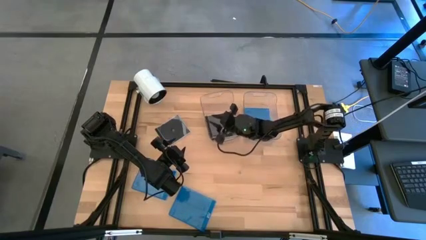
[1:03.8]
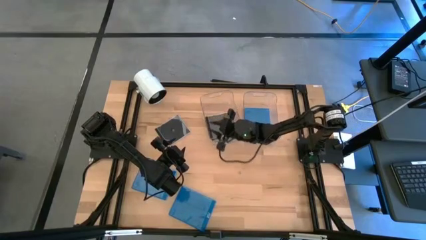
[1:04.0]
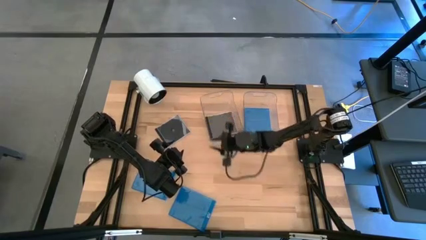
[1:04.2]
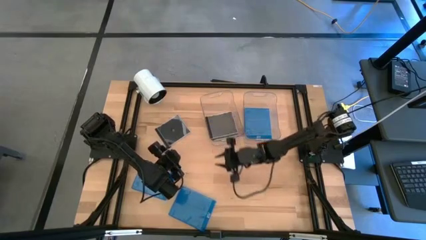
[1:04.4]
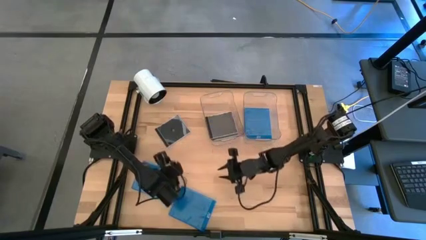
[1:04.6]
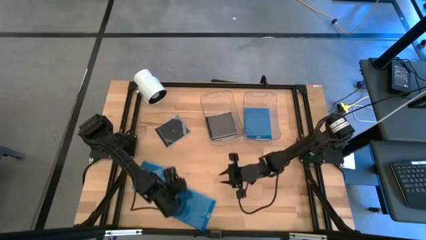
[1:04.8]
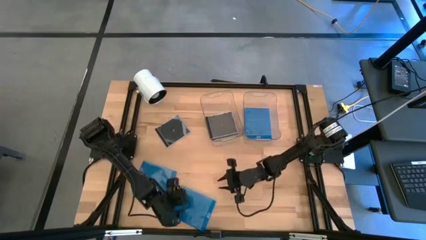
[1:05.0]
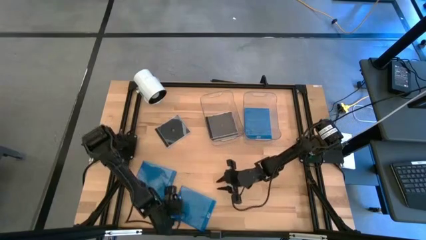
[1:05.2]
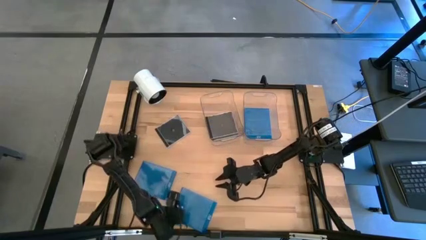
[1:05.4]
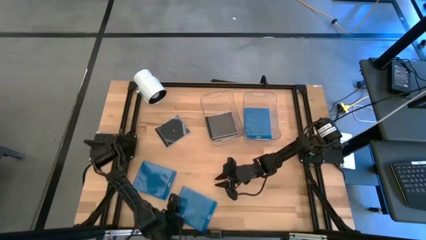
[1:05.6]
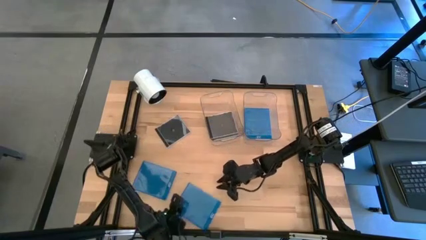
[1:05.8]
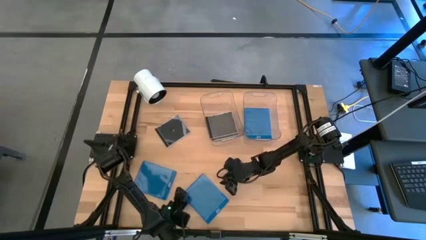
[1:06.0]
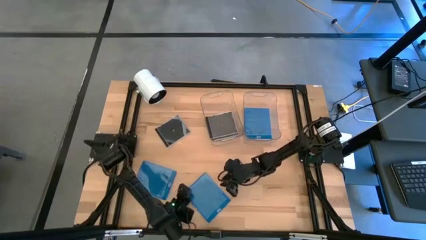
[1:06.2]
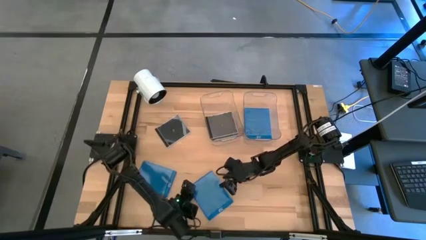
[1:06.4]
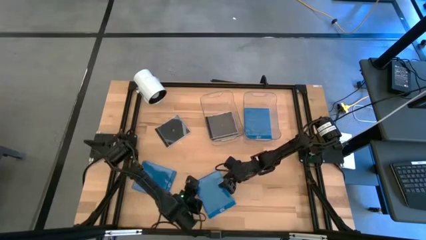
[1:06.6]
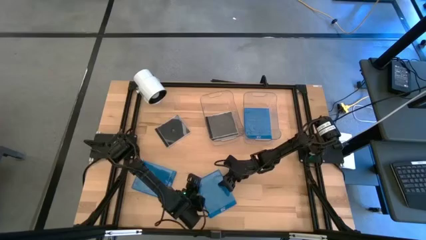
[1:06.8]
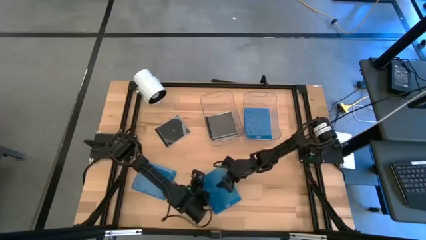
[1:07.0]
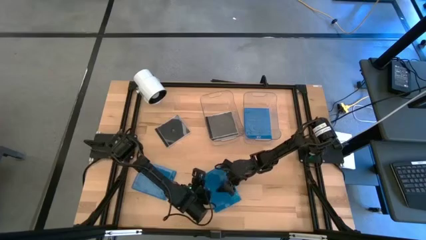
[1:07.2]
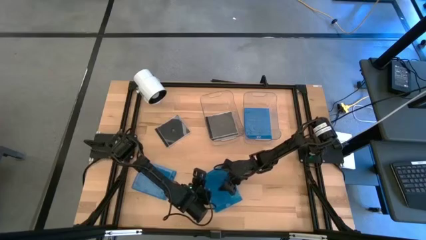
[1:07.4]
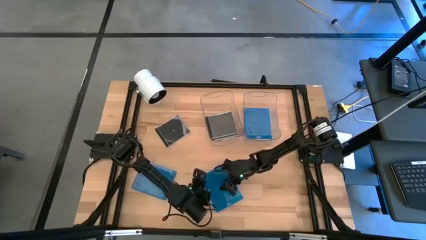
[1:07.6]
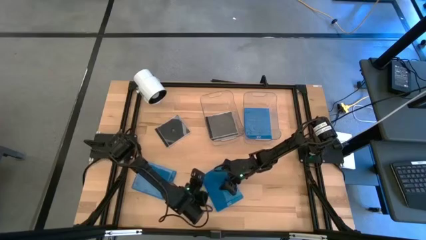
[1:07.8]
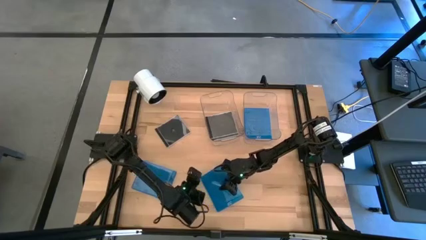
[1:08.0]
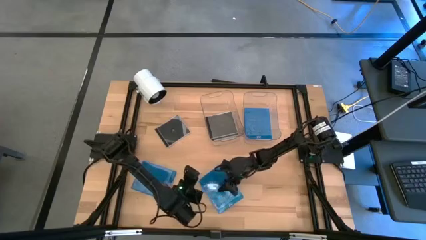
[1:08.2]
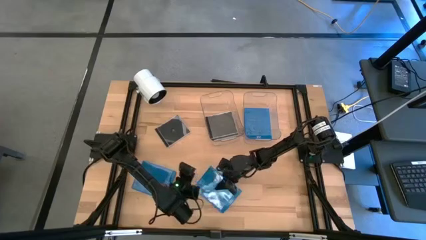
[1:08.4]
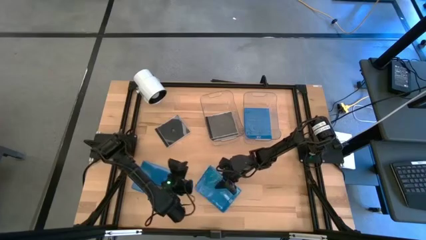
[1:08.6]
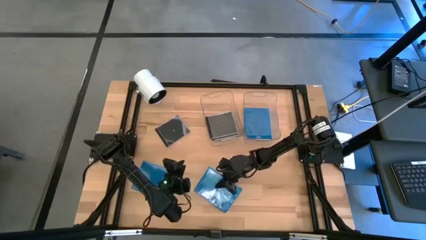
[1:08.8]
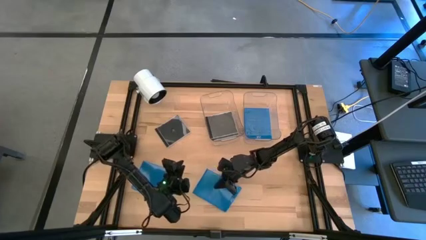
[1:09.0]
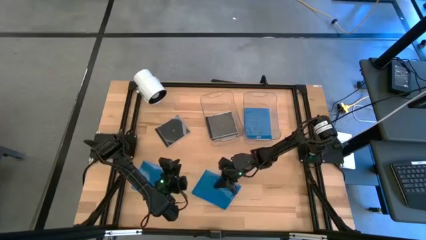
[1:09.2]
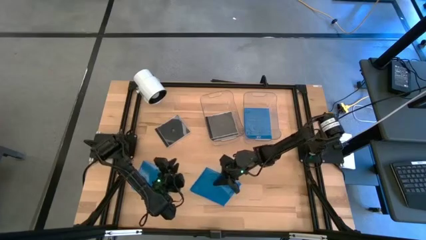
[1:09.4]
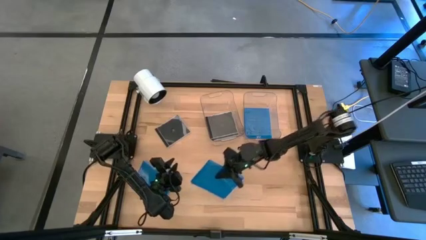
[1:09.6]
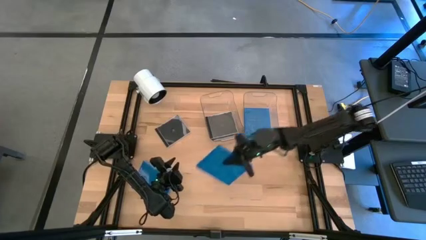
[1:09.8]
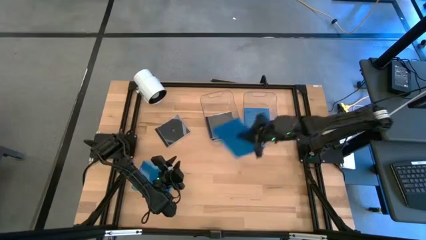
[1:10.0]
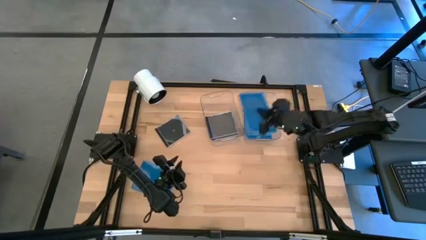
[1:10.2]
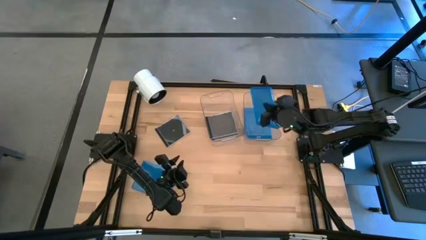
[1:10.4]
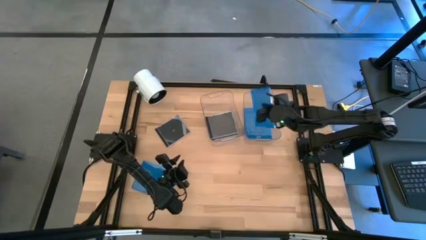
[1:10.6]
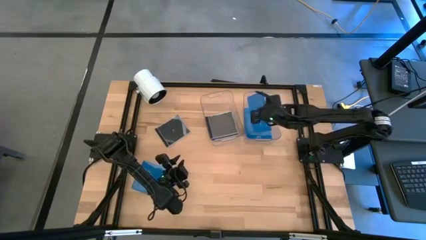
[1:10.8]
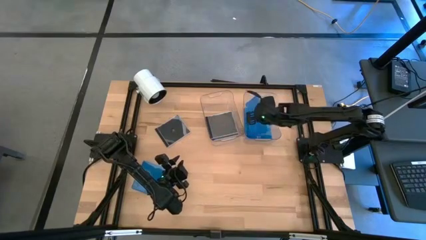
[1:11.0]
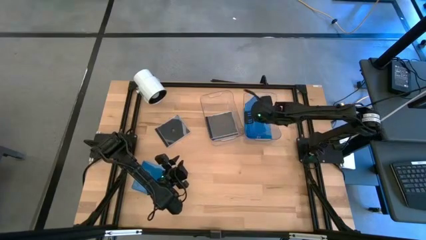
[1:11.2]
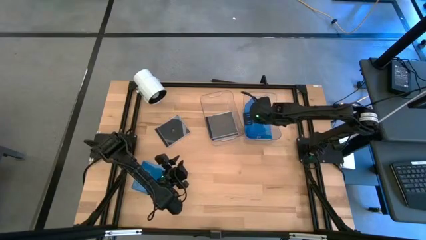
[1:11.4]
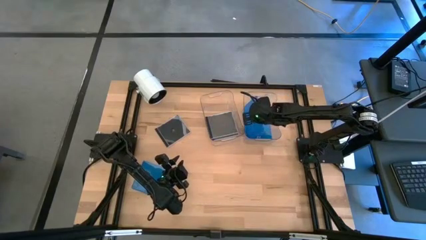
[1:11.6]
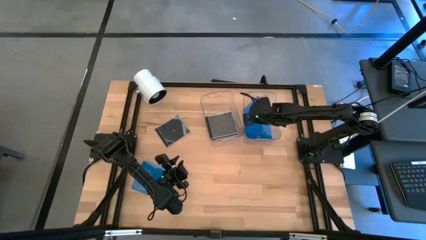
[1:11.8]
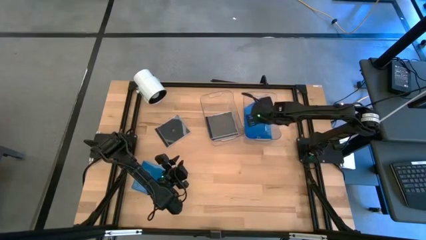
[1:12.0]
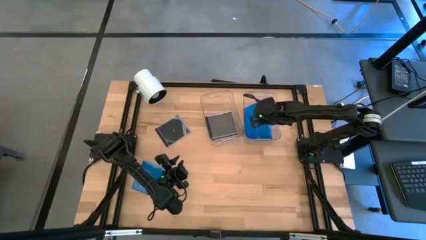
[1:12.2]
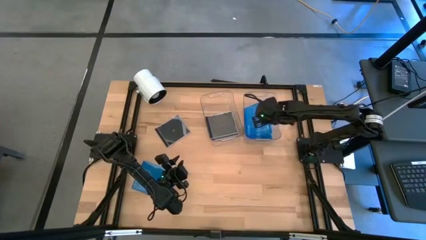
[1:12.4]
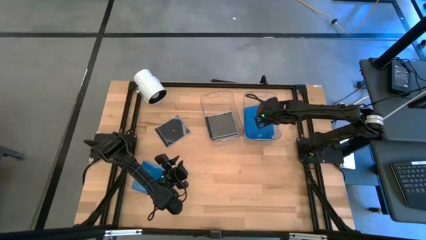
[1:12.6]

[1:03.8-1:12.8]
Task: Pick & place jewel cases by type
Put the right blue cd case into the right transparent bin

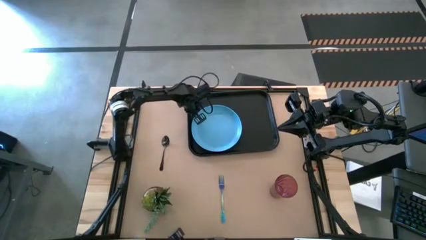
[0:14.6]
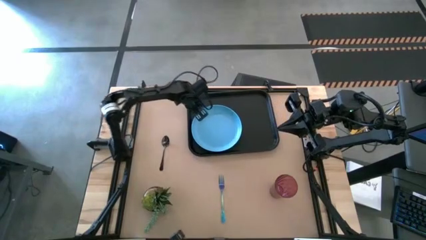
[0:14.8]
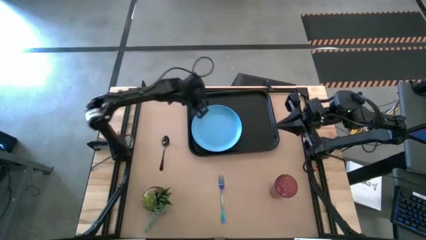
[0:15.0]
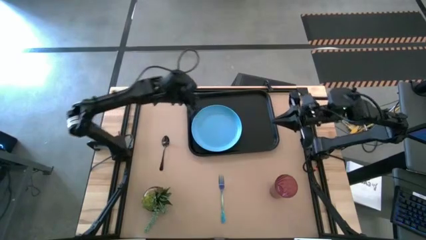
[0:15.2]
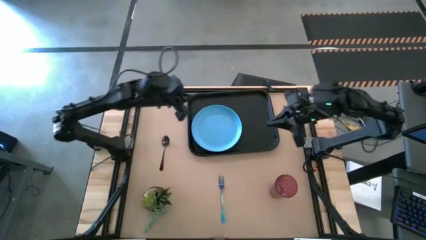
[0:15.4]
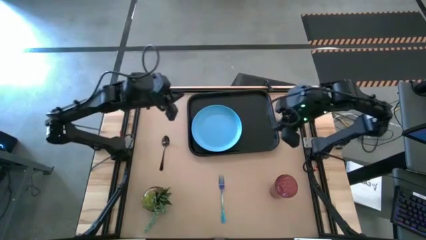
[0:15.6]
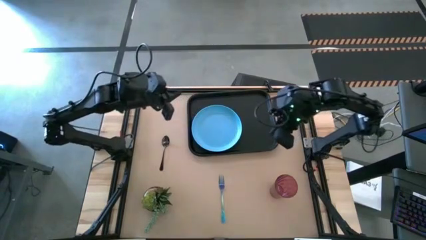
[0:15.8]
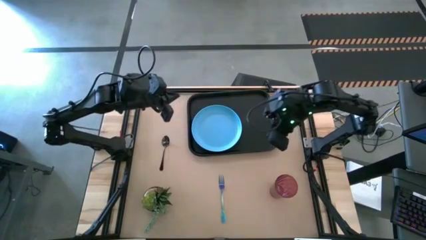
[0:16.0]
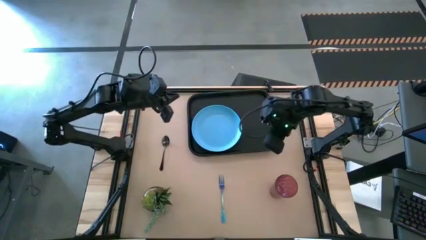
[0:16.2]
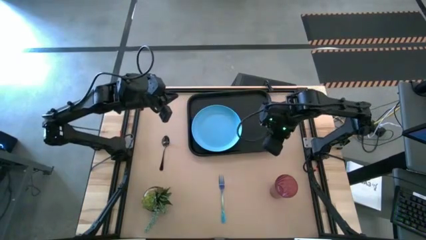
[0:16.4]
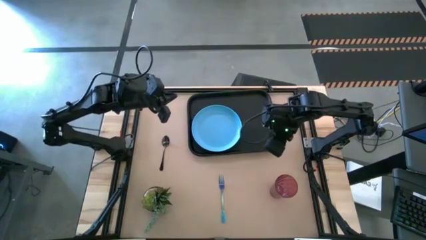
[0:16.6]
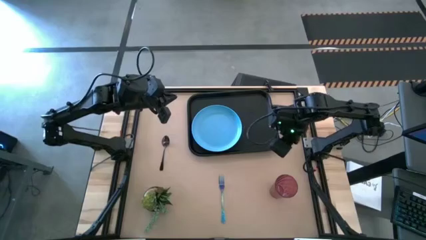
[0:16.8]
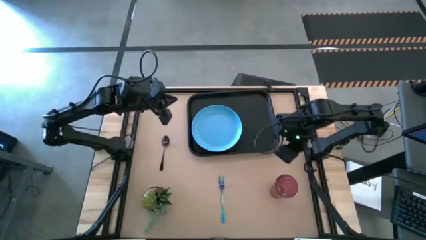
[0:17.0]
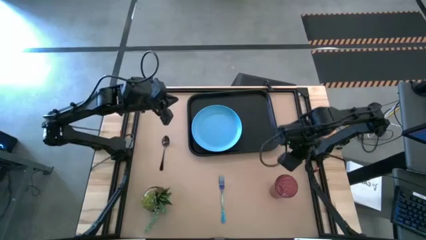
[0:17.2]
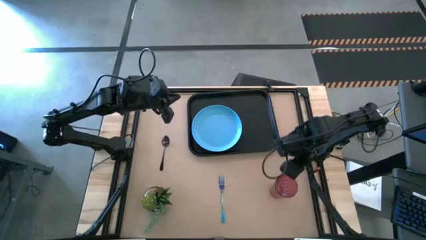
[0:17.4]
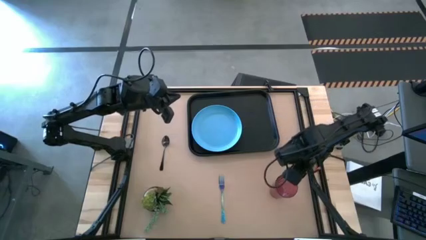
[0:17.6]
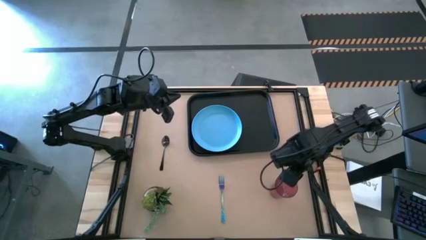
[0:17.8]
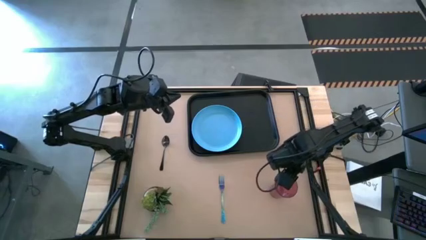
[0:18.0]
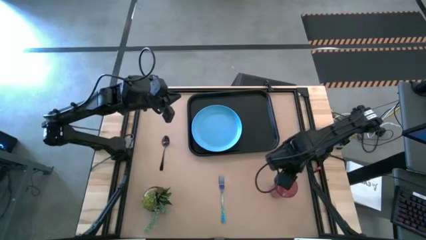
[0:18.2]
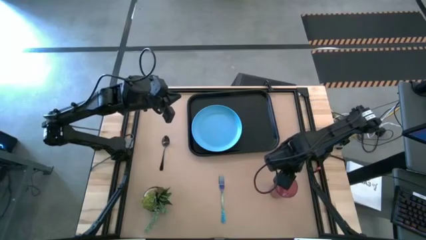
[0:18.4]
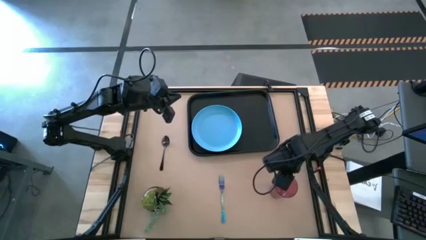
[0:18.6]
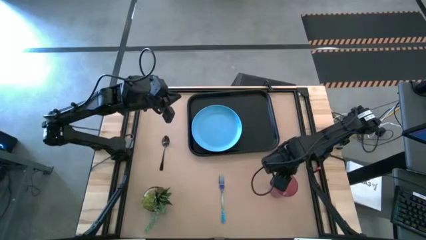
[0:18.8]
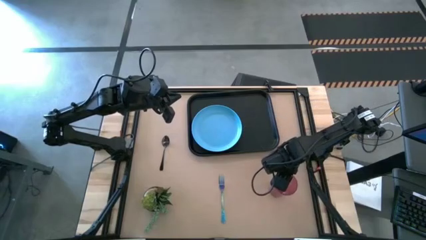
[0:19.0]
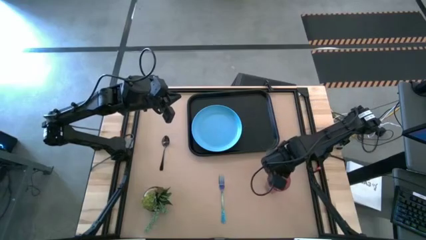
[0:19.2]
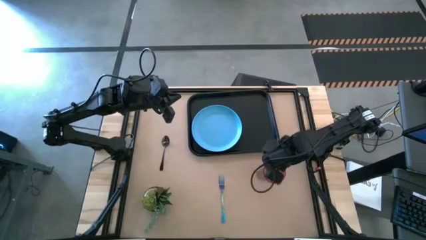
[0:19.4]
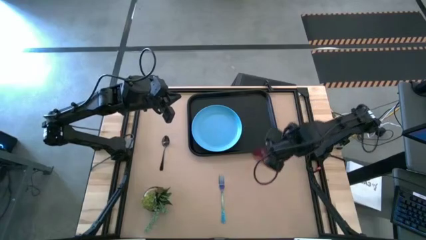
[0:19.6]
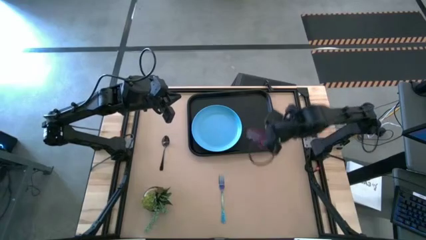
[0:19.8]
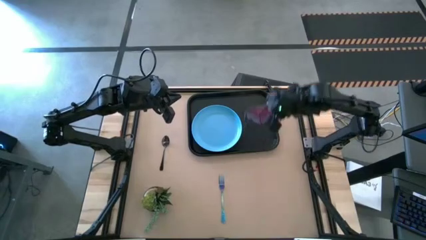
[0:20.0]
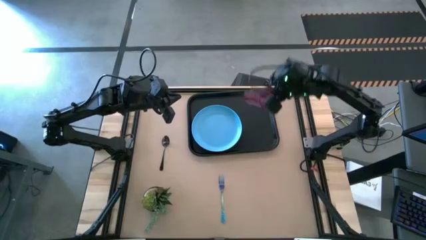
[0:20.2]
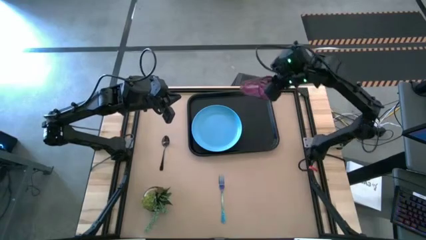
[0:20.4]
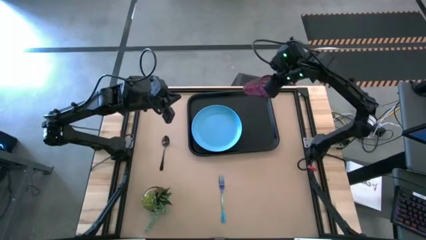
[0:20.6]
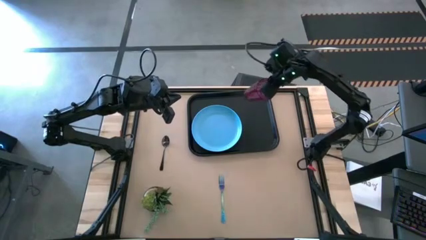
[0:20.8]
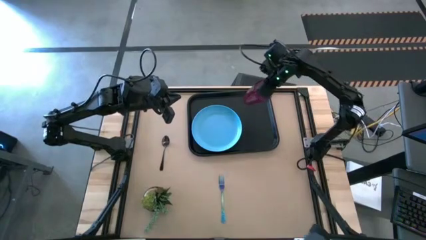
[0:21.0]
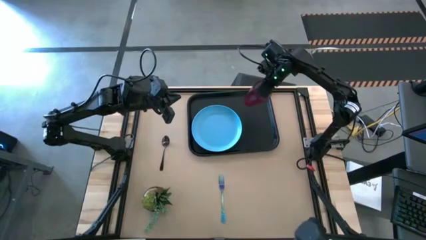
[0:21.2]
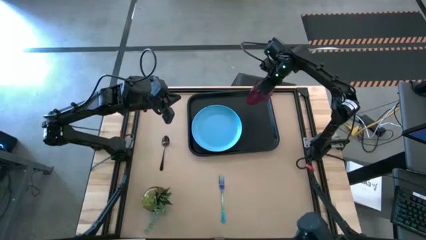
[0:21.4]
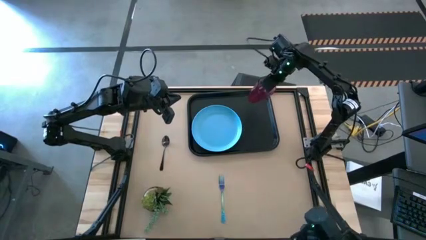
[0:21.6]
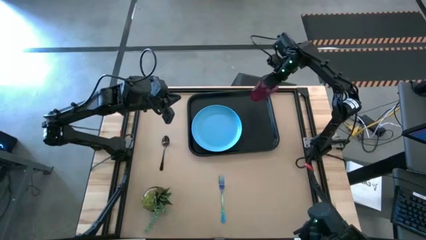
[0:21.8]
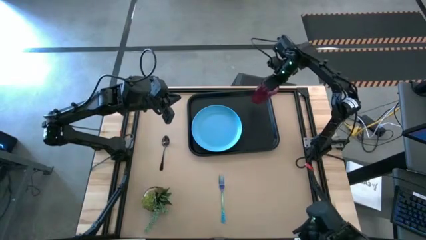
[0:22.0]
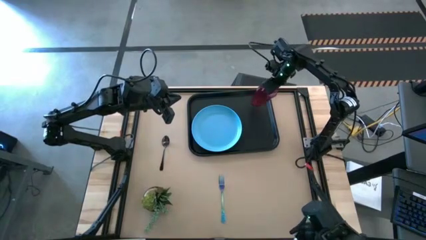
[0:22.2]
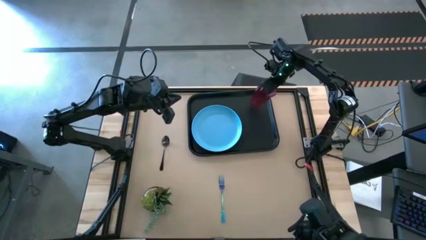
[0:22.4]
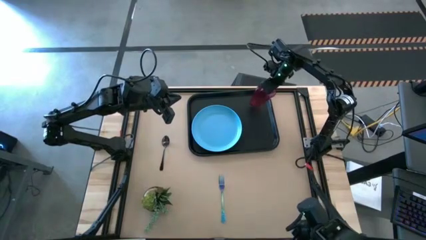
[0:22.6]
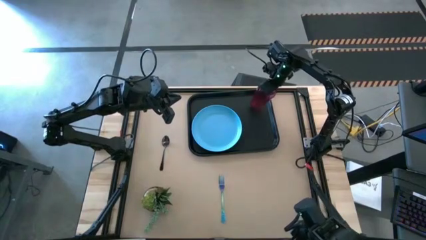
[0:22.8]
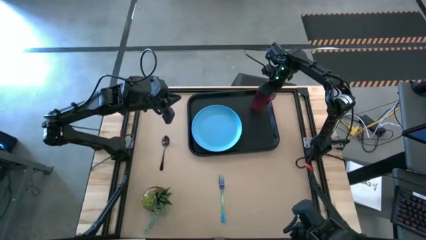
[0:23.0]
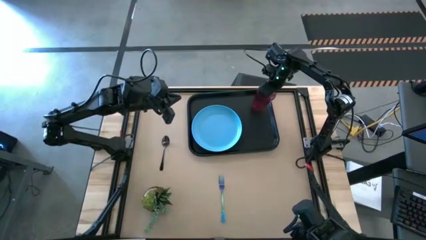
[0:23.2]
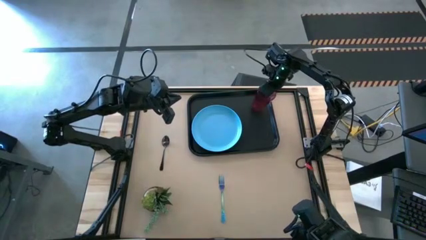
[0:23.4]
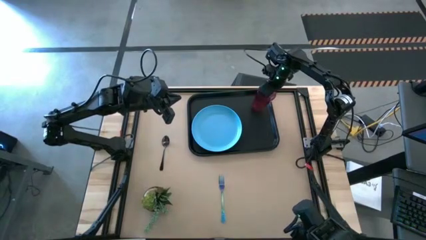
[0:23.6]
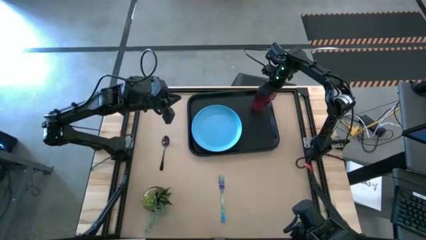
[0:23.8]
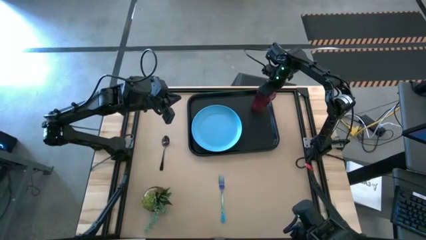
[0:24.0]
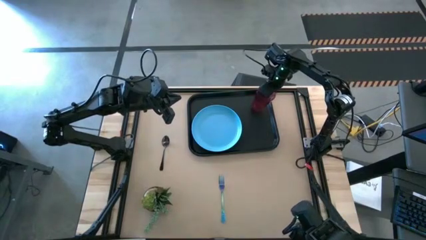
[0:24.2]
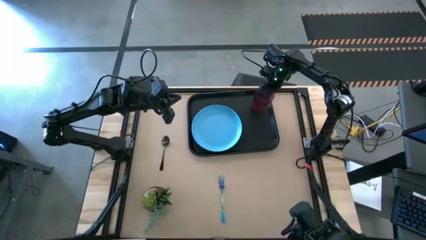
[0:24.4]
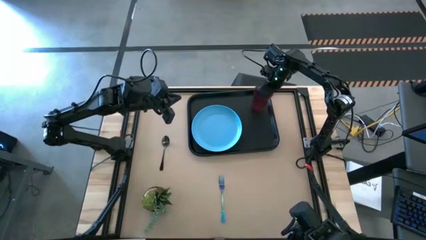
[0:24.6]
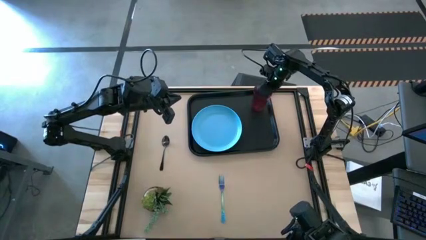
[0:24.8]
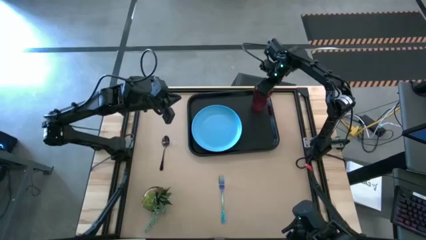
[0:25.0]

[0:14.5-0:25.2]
Task: Pick and place plate/cup/fork/spoon on tray
Put the red cup on the top right of the blue plate on the black tray
